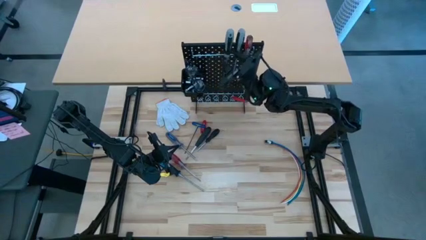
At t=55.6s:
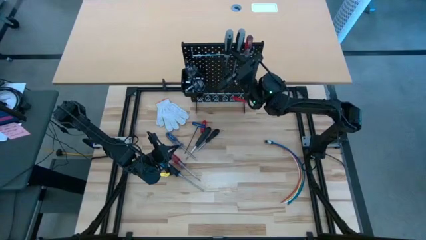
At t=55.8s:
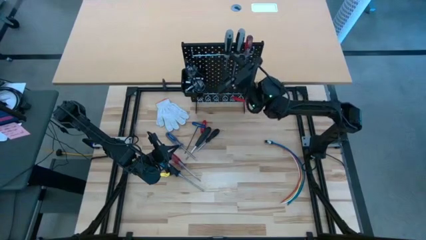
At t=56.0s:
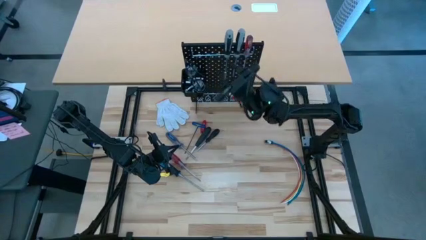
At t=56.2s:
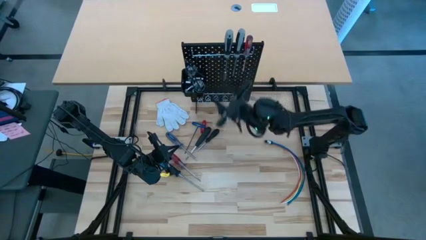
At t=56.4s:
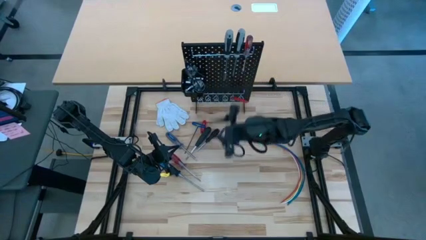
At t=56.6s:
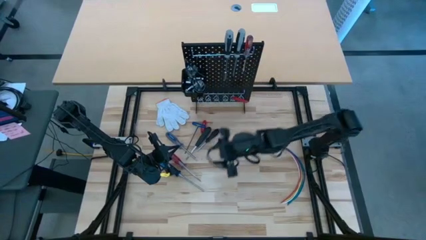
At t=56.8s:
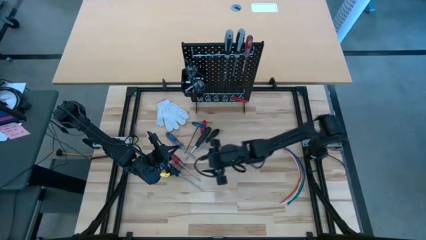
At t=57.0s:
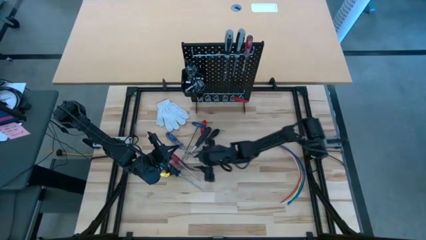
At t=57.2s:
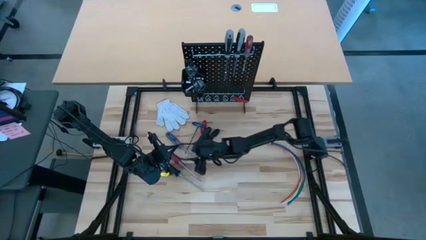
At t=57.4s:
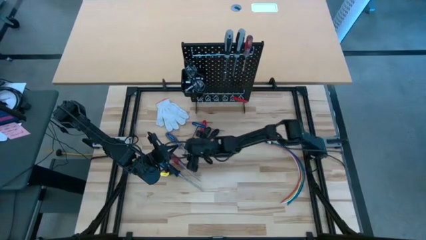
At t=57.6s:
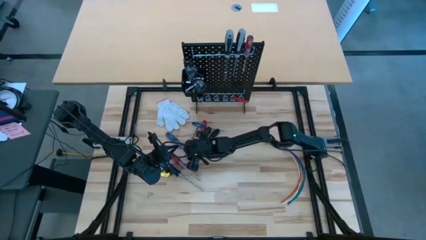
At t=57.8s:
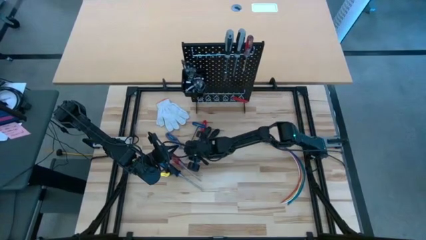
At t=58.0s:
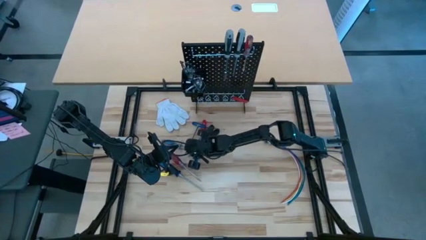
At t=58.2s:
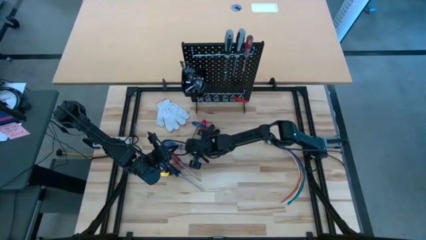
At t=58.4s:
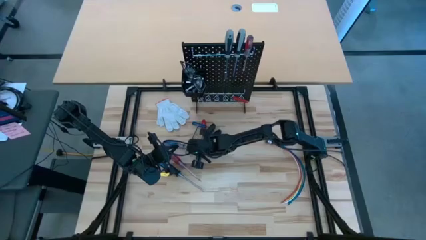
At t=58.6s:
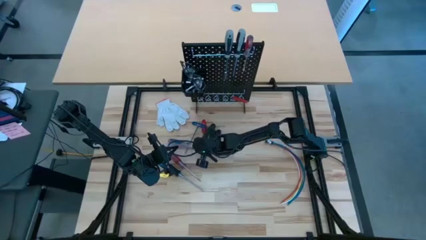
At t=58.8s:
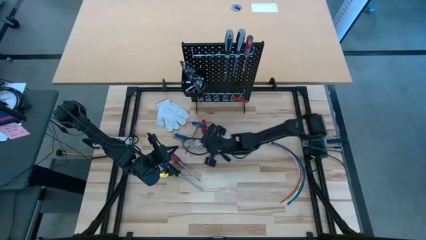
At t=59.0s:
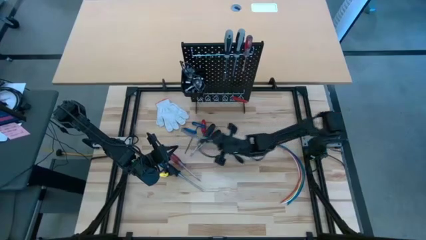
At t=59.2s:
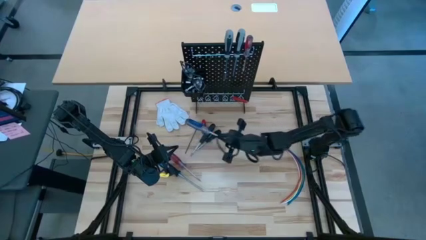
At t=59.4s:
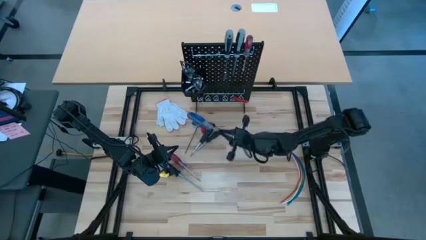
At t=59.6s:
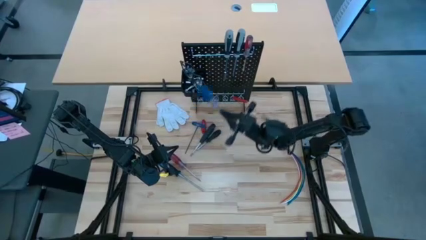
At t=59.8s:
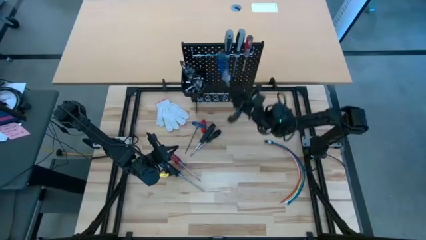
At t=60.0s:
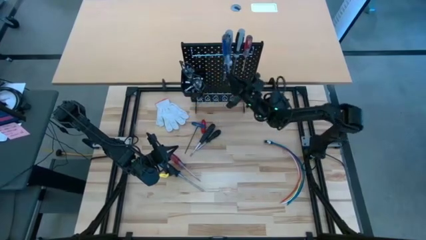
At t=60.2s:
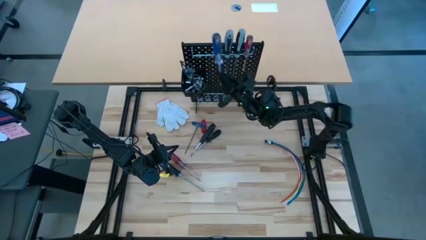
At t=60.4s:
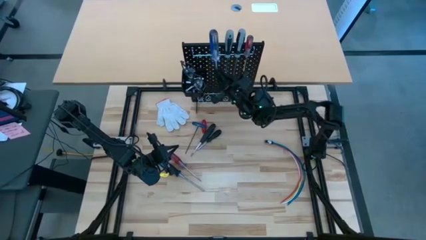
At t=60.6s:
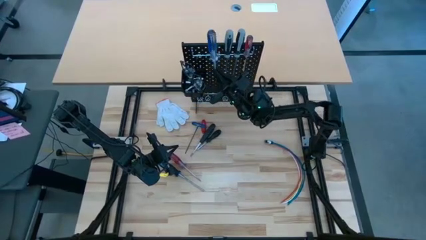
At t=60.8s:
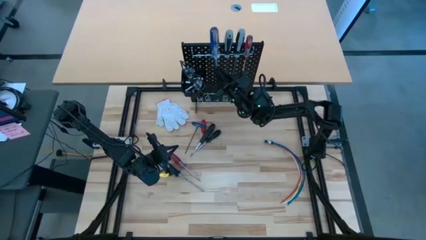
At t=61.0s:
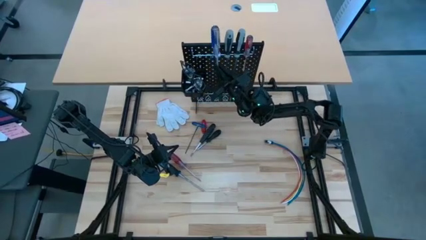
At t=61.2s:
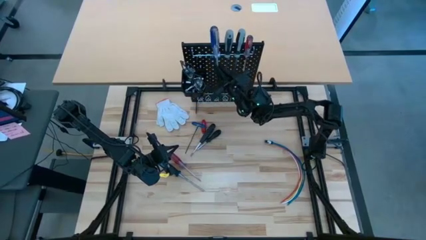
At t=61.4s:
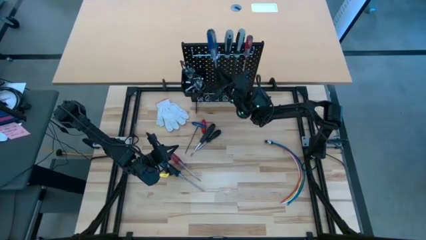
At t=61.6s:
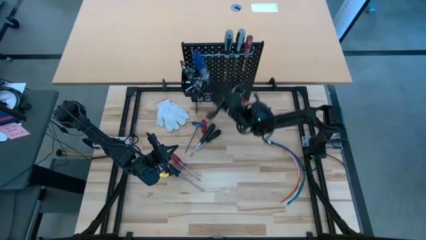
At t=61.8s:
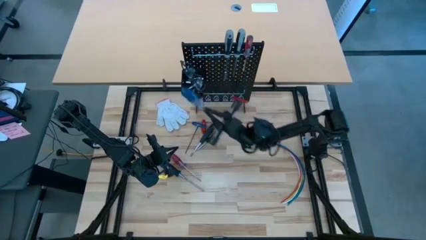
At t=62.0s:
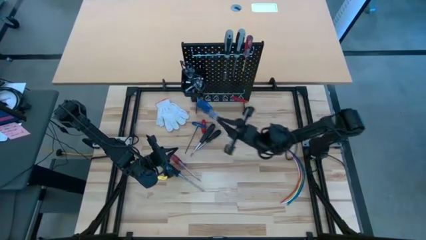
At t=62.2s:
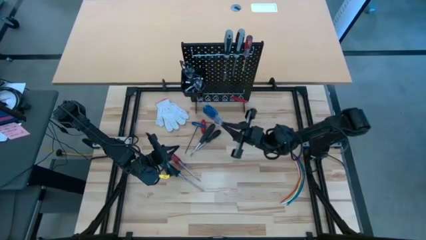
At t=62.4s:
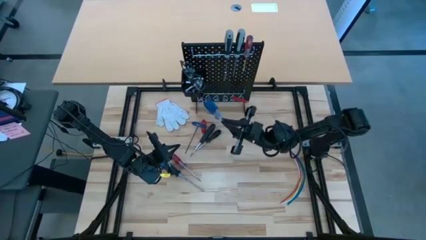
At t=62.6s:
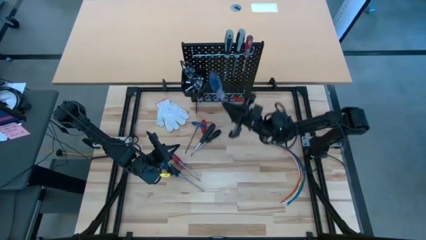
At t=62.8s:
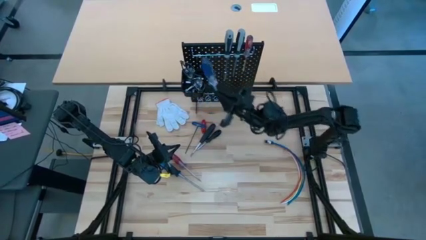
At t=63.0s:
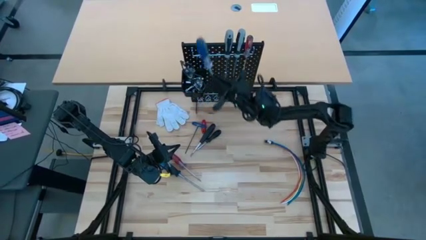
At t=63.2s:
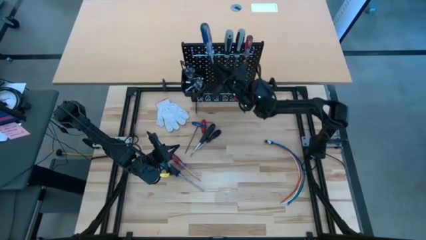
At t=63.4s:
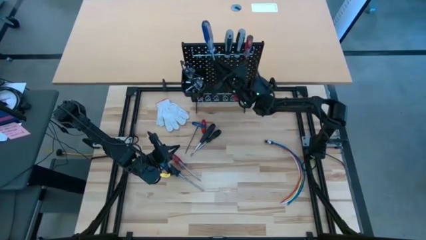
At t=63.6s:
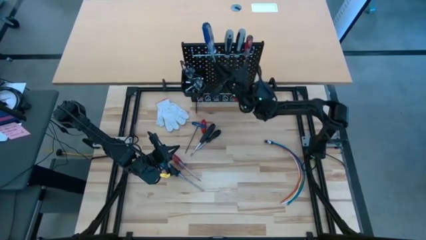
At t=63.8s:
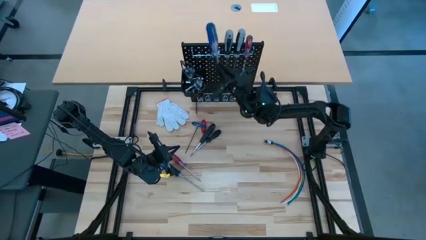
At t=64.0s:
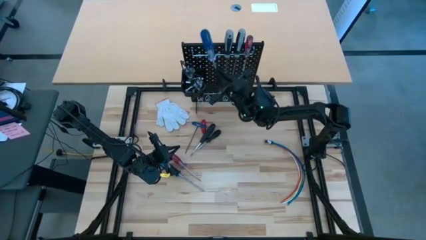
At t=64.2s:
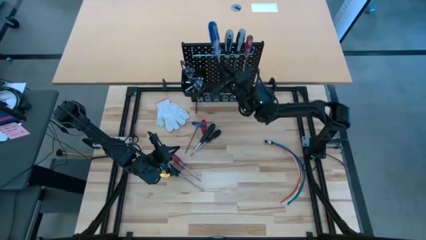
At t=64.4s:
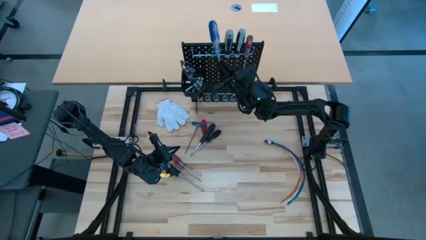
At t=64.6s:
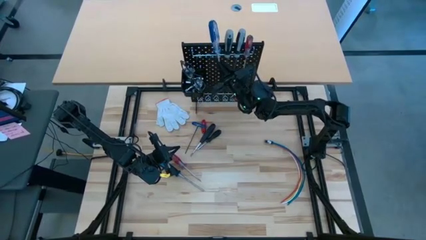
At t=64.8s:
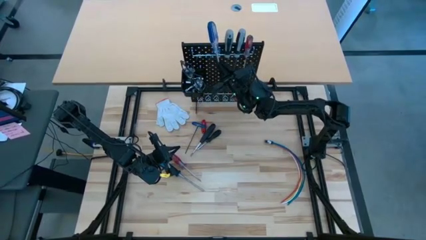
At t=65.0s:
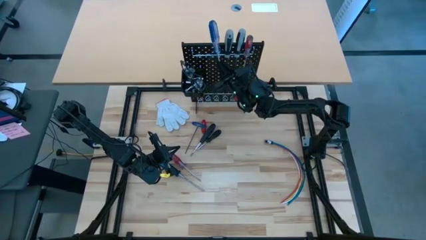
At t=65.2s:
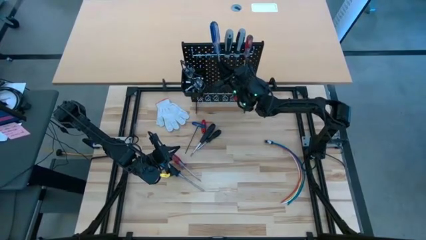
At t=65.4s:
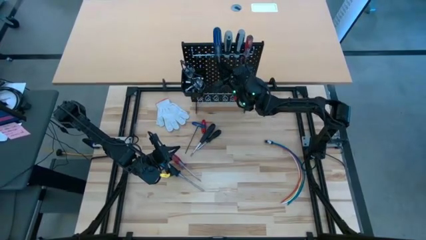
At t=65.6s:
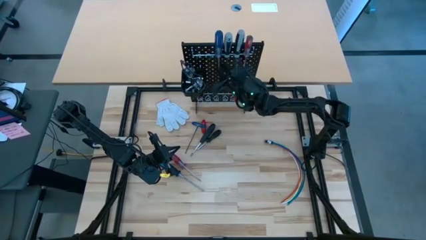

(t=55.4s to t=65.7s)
Task: Hang tools onto peg board
Hang the transparent blue screwdriver on the peg board

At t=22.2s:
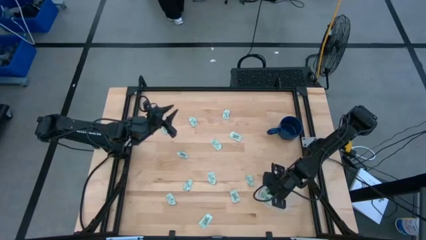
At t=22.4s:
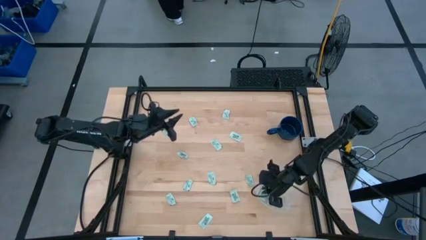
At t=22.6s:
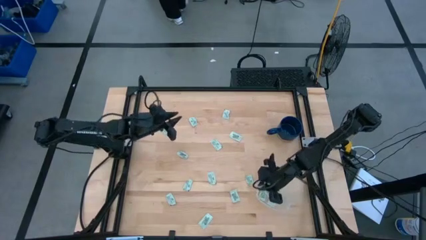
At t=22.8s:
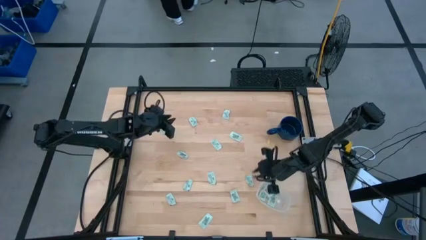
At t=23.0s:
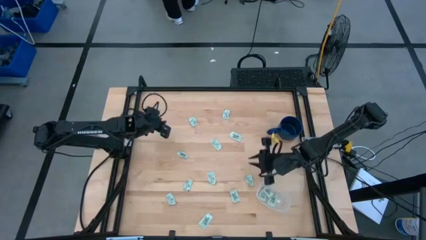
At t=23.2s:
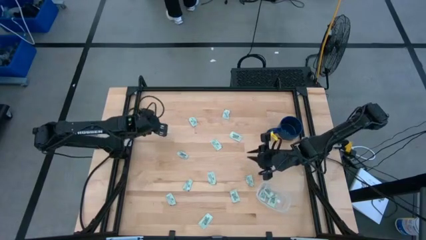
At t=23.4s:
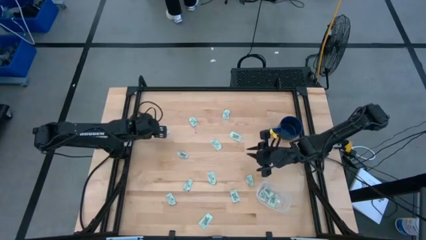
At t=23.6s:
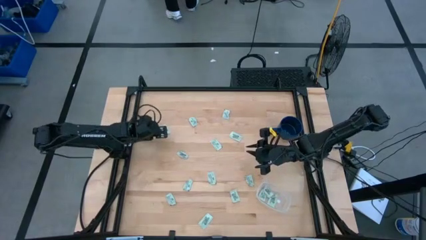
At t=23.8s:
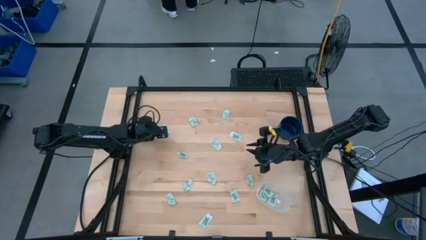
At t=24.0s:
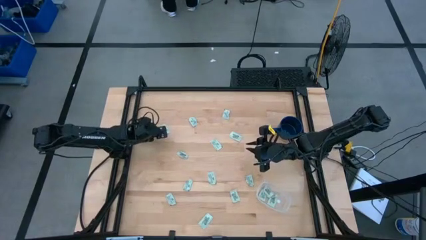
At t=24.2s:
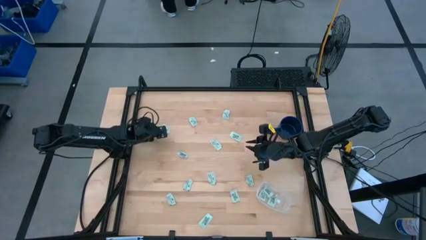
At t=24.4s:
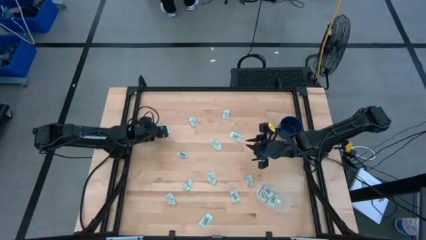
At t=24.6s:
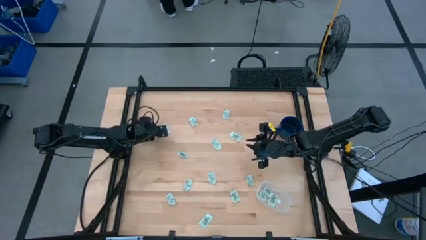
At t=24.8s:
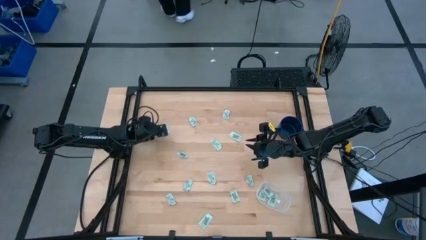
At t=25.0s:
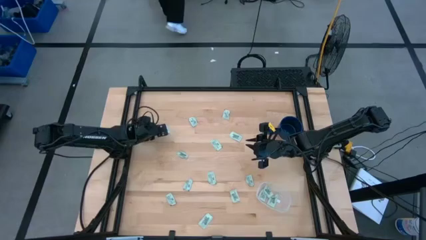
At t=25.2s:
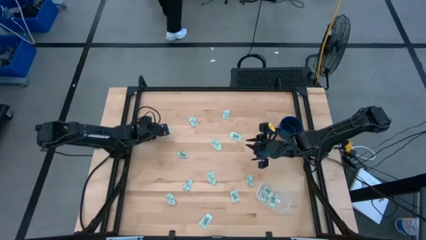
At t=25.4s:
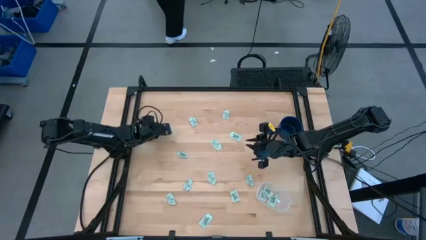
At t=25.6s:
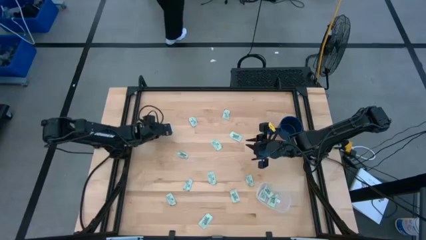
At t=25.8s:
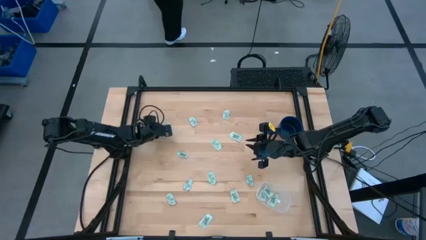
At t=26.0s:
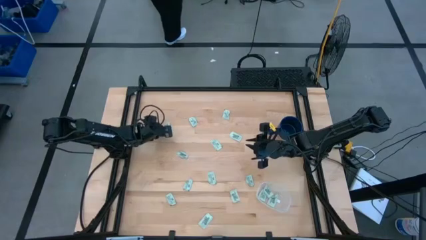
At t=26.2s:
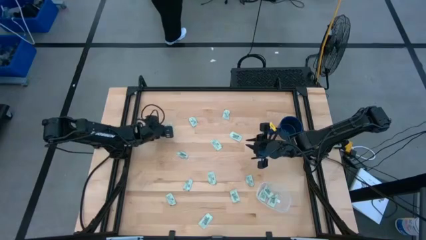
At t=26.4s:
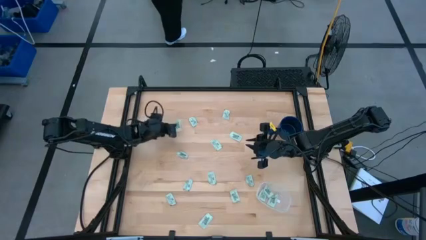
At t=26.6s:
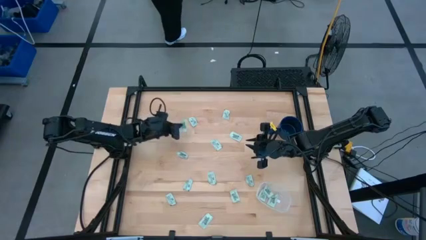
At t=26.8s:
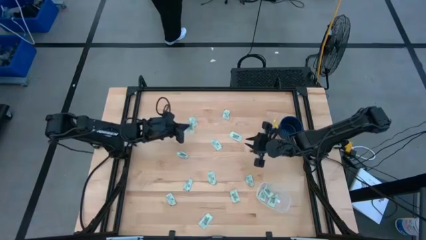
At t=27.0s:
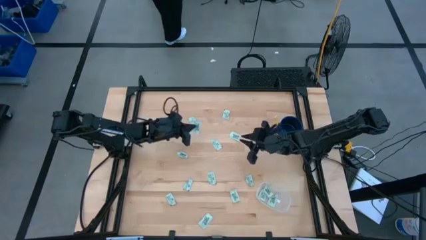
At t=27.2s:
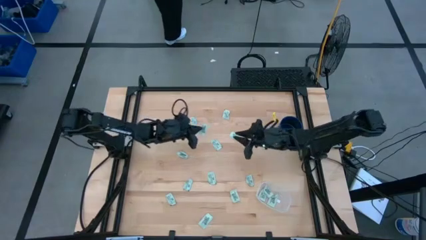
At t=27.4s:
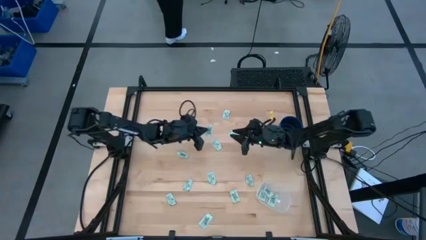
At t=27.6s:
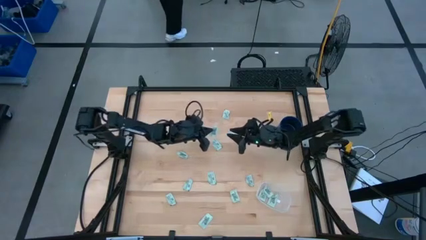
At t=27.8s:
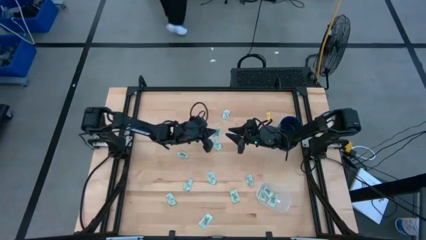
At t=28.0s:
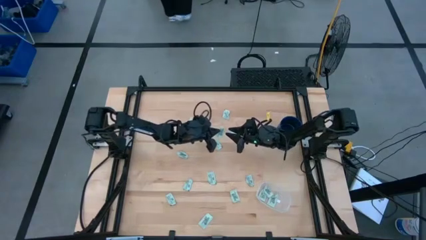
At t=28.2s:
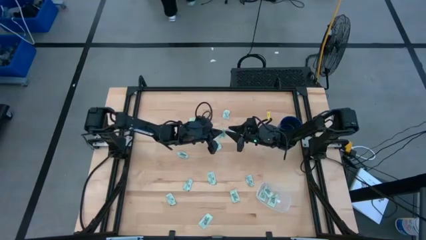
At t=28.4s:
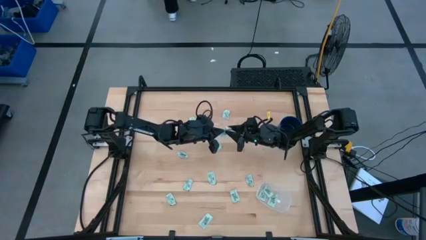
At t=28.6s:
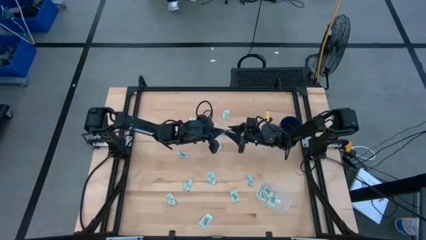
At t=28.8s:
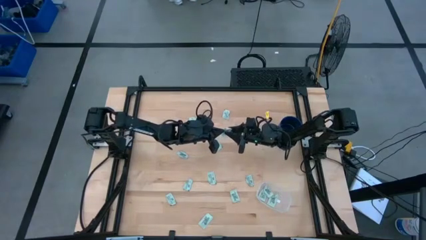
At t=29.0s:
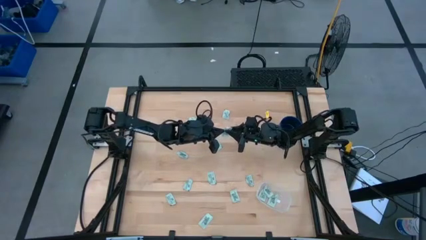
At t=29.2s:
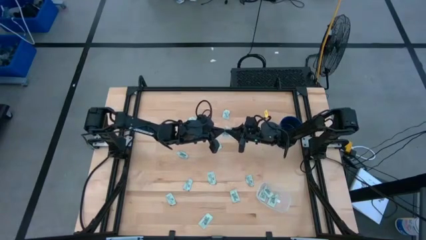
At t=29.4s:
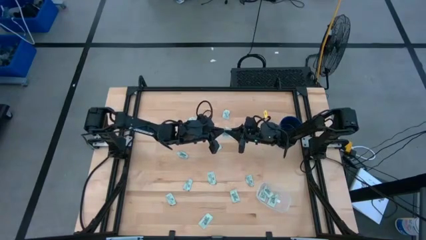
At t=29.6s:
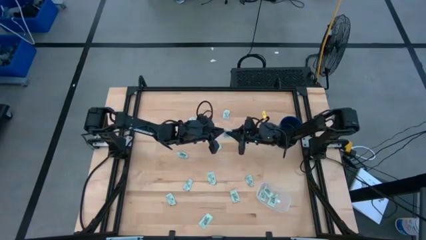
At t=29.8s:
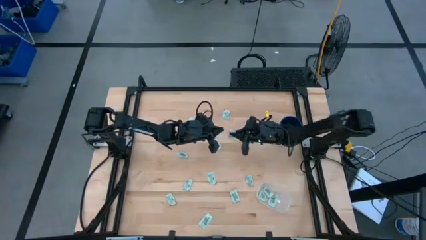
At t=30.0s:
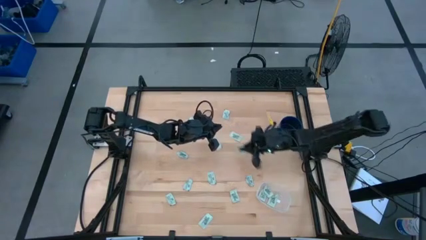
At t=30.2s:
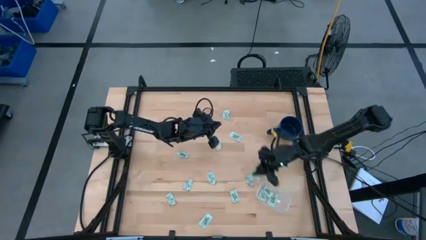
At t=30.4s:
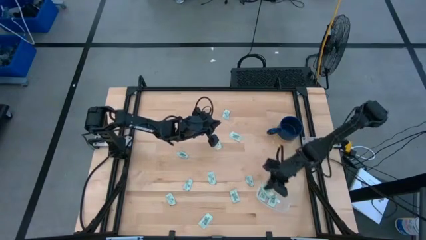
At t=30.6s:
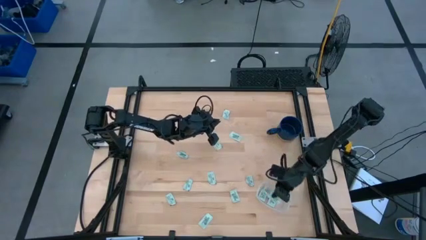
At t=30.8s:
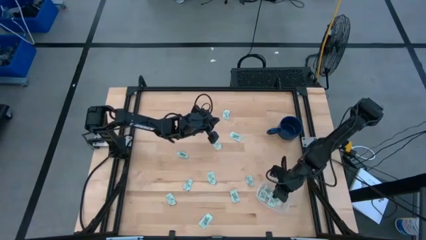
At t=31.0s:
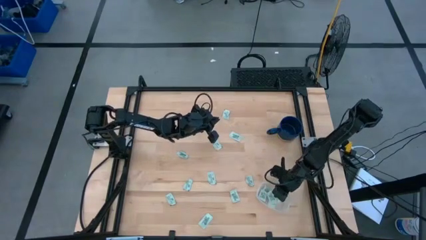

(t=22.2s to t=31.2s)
Task: Pick and place Stevia / Truvia into bins
Put the stevia packet into the transparent container
